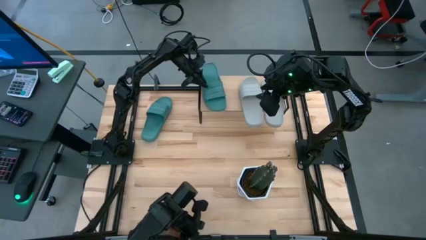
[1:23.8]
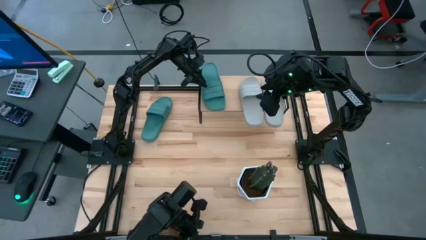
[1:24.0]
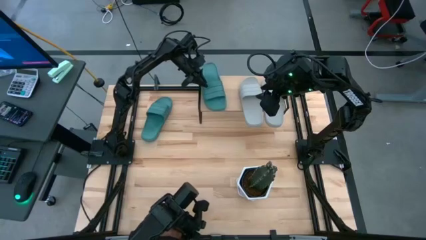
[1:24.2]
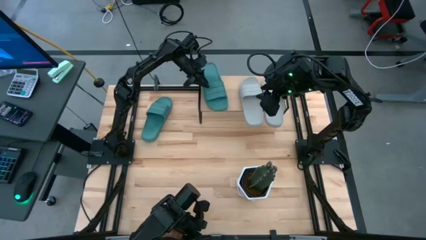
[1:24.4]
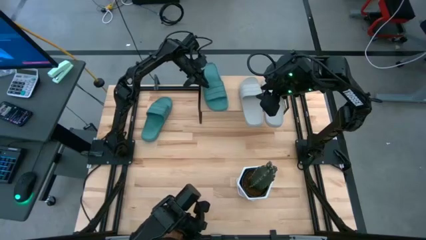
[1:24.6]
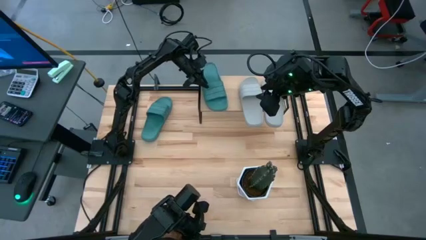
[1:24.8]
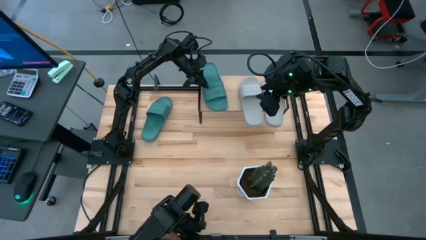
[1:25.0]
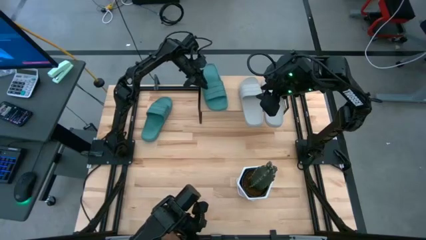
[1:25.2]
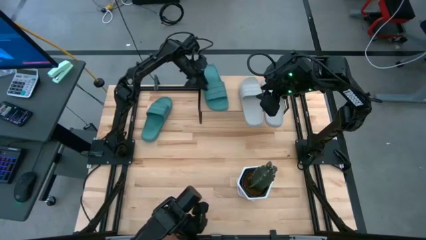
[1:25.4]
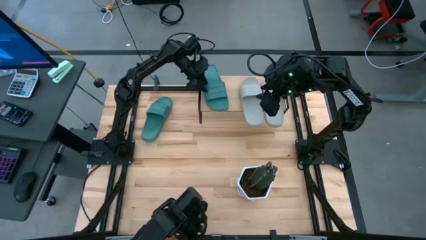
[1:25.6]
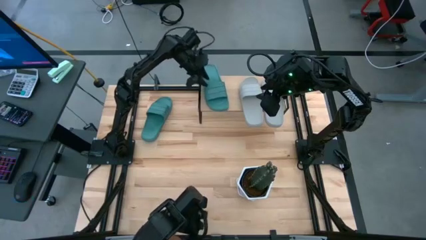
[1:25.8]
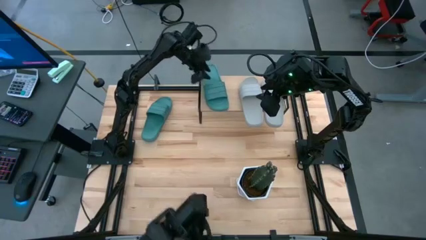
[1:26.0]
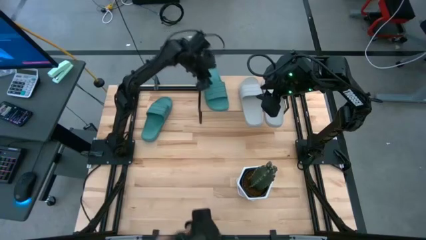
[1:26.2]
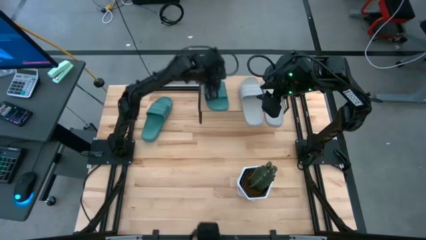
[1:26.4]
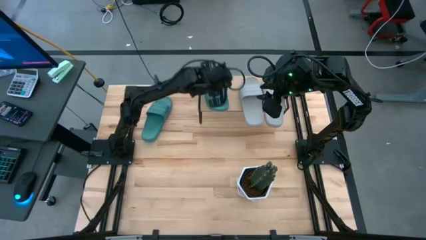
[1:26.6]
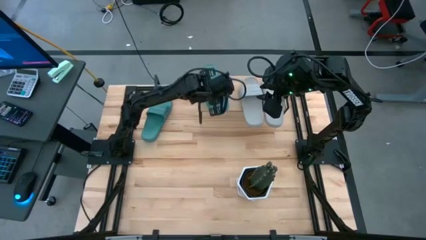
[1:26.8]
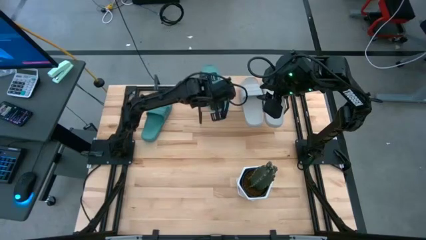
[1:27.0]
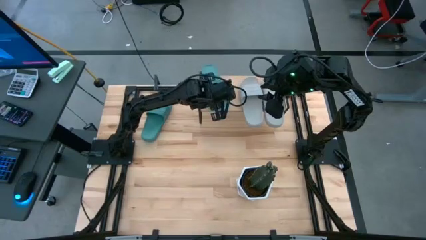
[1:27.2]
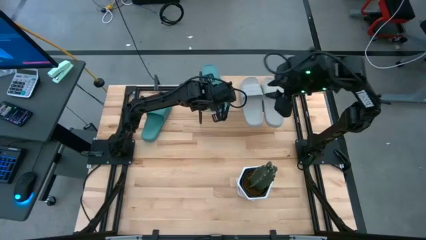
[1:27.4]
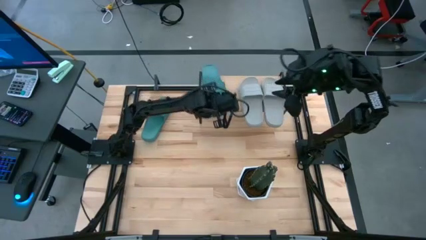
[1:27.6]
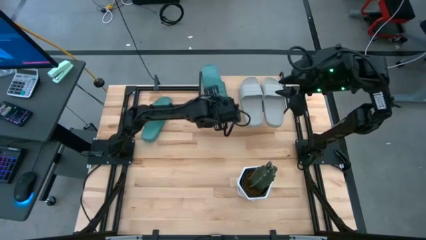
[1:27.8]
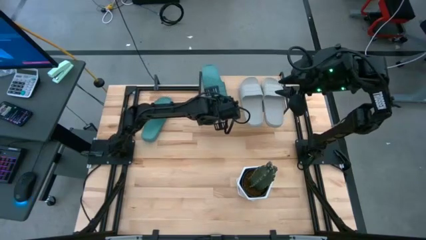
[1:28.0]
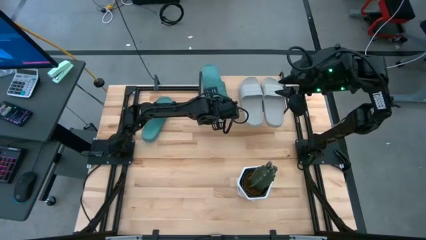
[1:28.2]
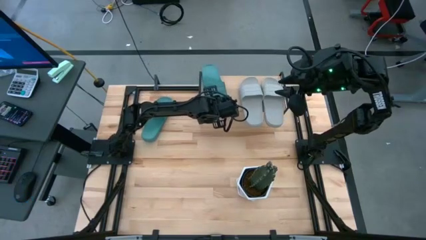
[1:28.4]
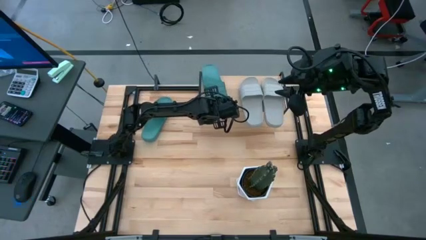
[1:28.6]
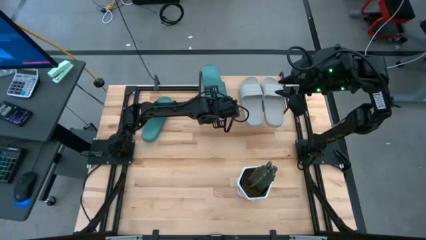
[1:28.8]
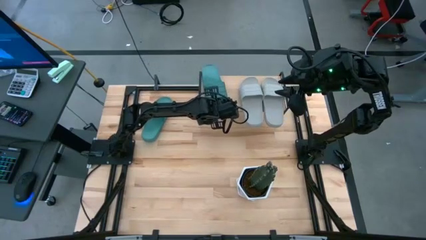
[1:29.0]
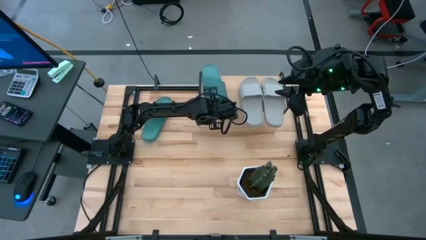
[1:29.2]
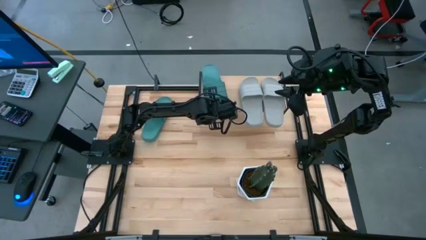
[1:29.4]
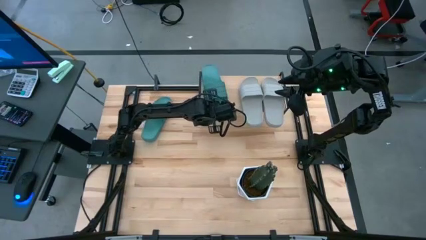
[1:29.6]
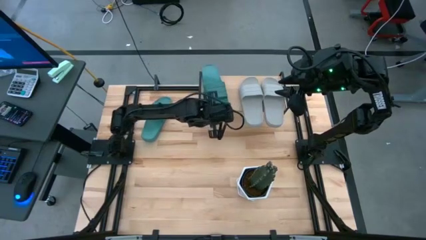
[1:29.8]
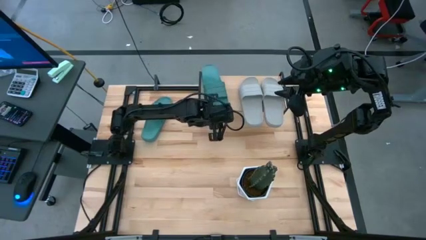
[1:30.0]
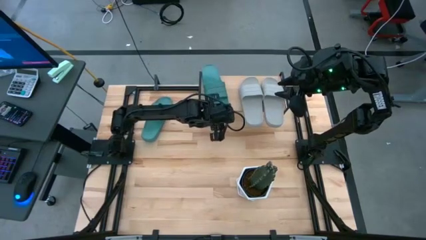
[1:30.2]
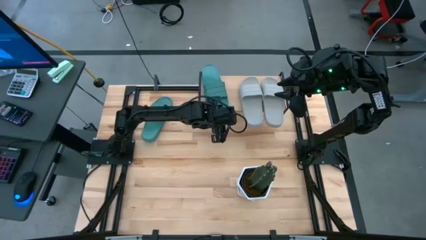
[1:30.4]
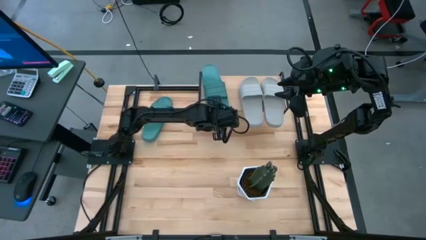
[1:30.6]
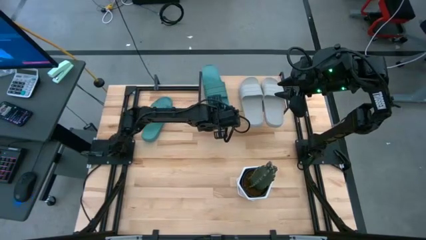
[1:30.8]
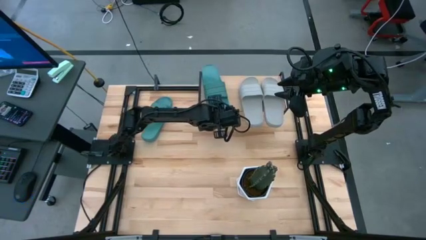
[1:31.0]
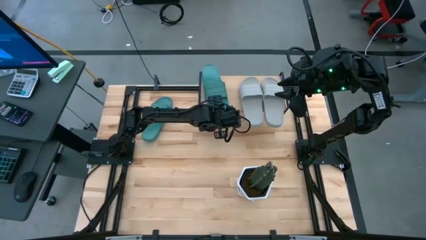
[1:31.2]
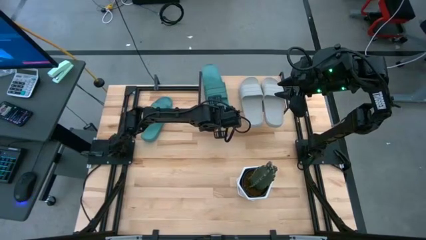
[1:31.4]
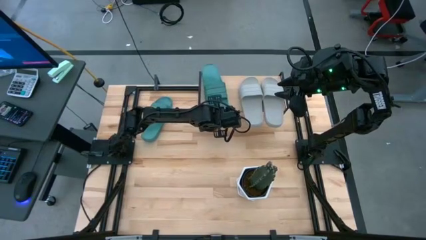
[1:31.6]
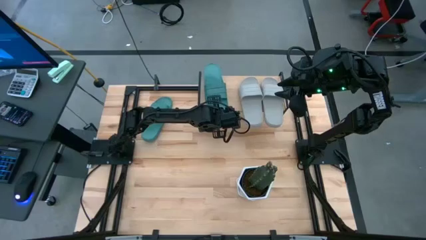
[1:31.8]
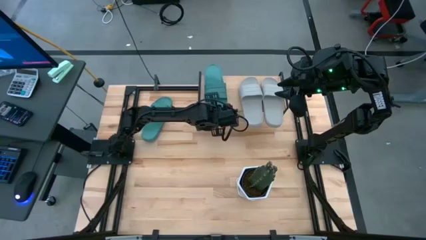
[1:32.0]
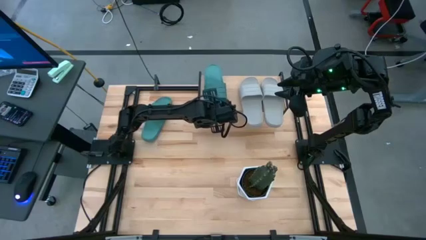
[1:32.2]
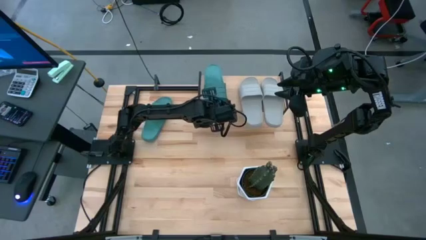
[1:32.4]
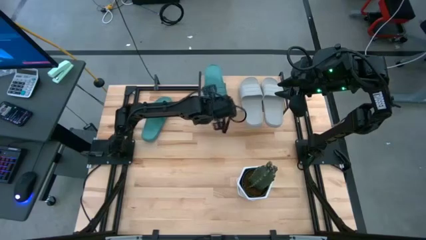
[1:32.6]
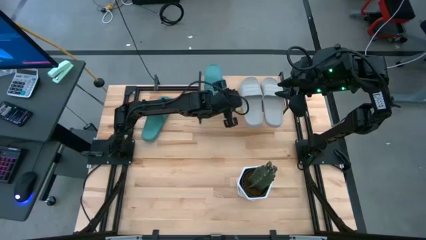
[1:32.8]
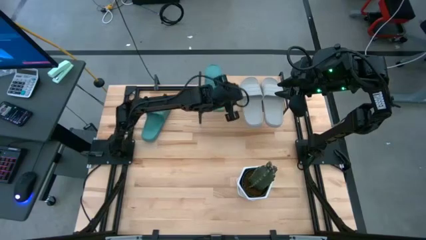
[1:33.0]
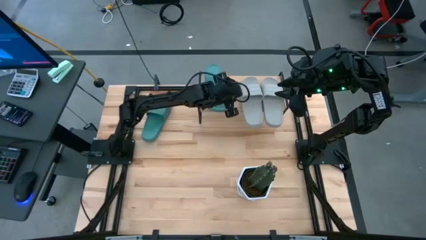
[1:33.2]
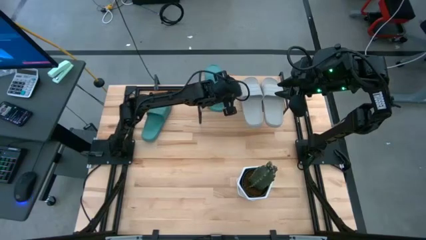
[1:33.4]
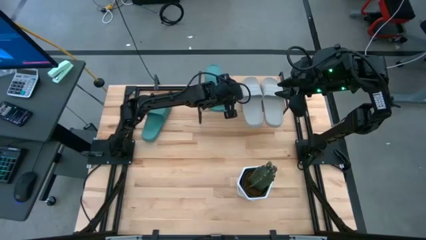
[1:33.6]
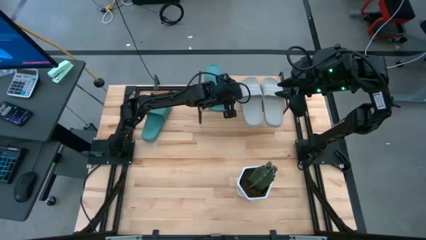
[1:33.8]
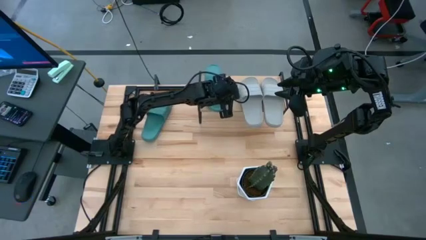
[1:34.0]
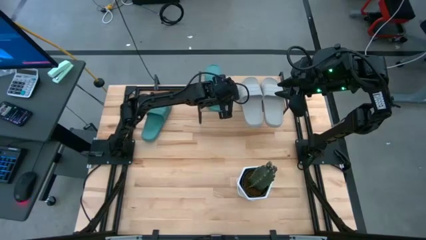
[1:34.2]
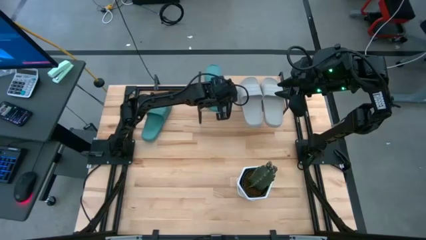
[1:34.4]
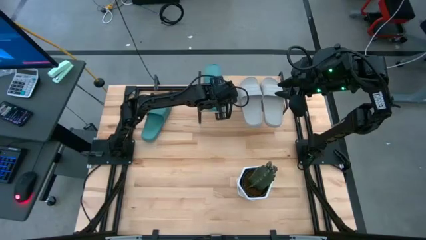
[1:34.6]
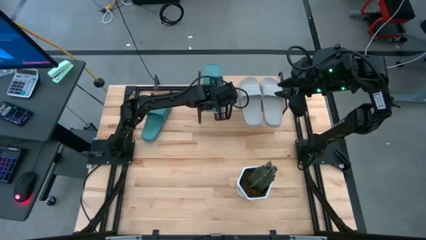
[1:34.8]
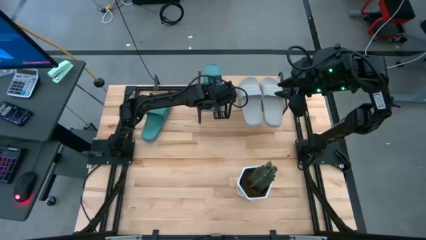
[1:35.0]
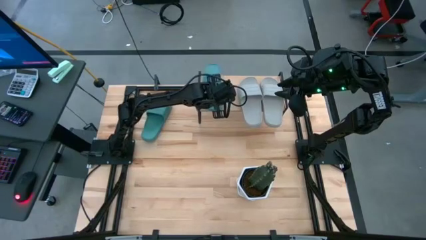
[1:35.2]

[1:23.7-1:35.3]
Task: Pick and place slides into the shelf
Put the right green slipper on the shelf
